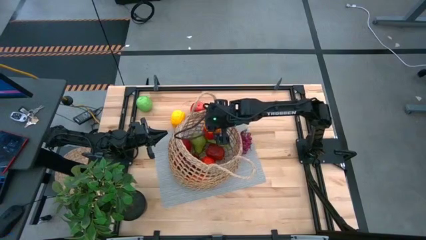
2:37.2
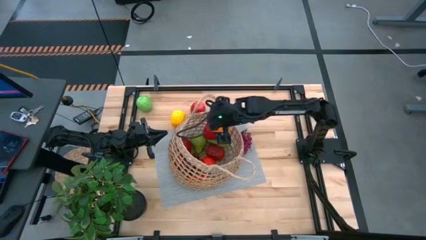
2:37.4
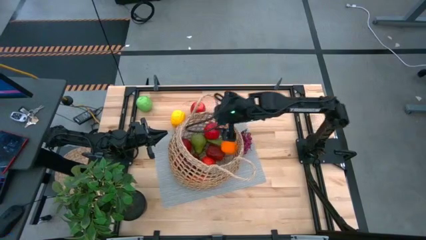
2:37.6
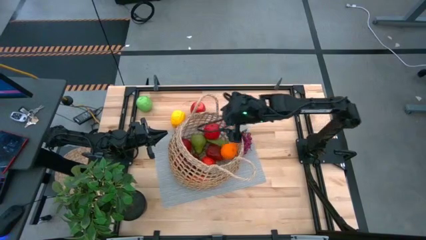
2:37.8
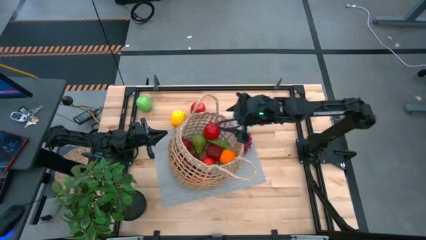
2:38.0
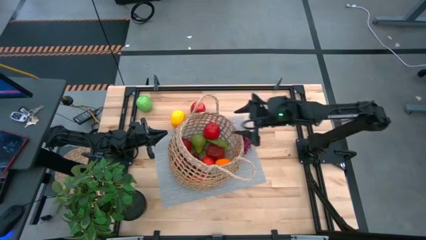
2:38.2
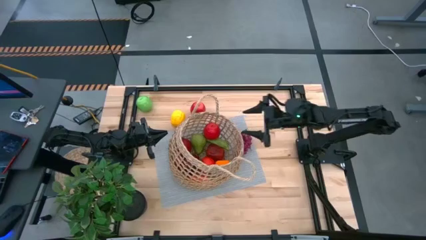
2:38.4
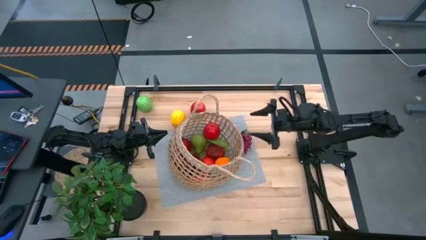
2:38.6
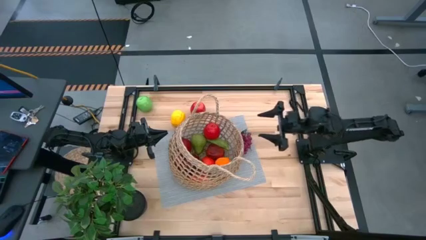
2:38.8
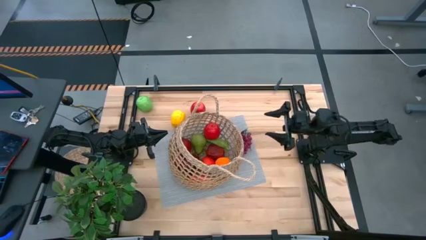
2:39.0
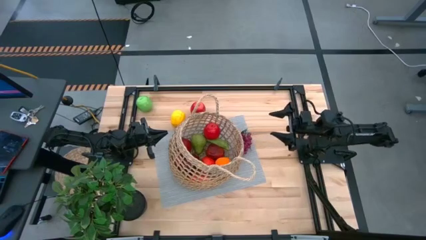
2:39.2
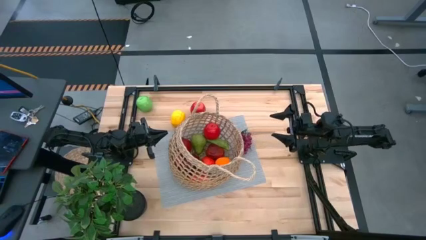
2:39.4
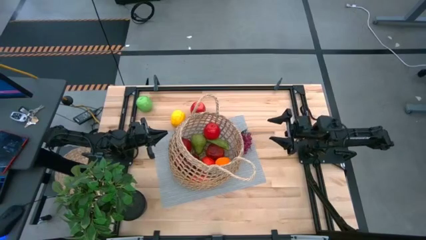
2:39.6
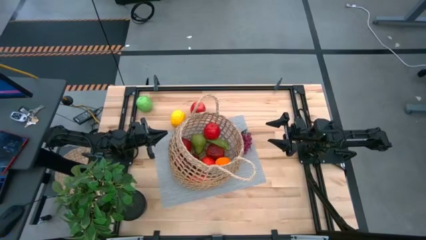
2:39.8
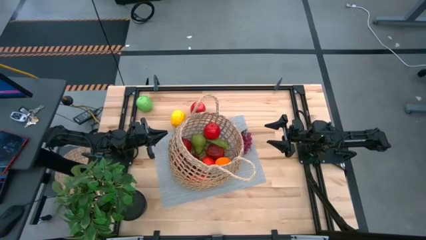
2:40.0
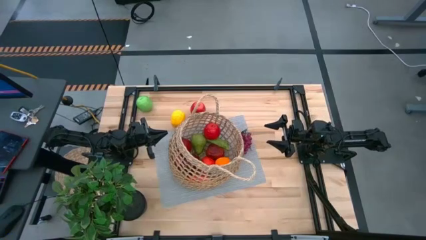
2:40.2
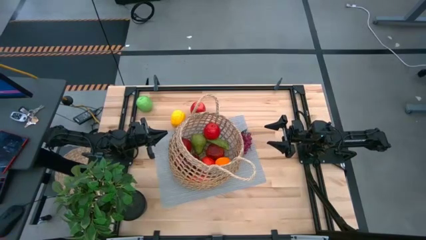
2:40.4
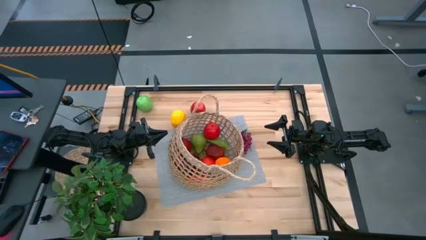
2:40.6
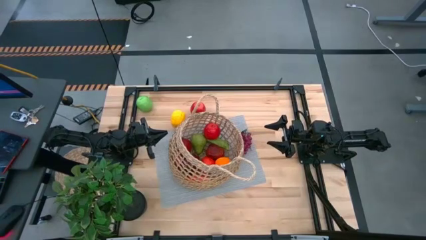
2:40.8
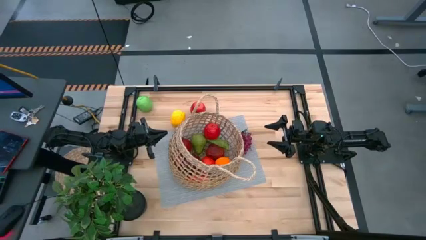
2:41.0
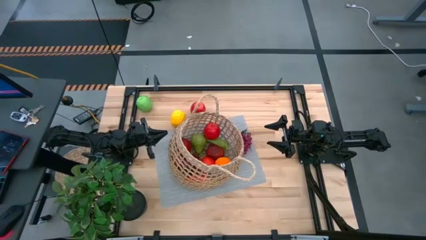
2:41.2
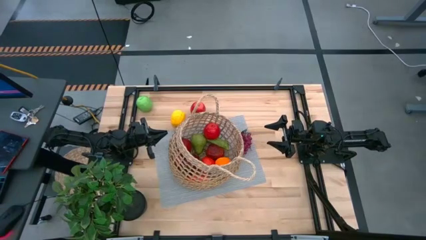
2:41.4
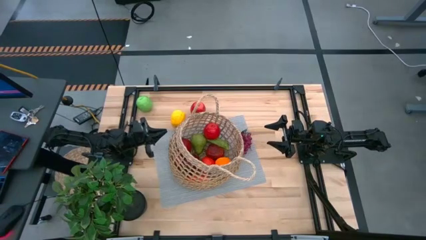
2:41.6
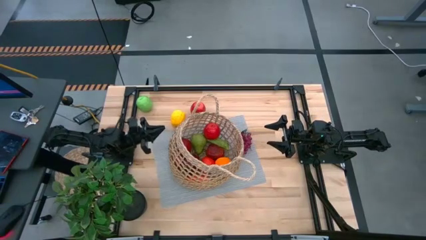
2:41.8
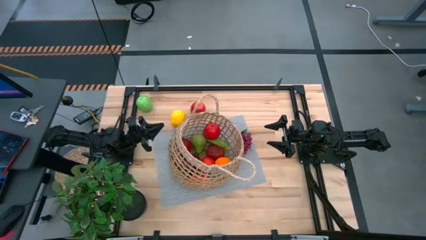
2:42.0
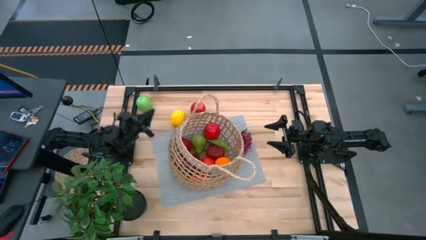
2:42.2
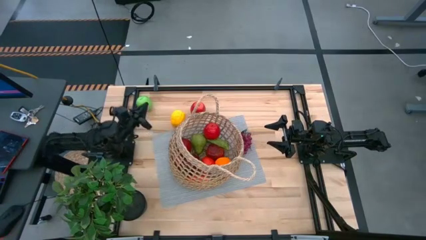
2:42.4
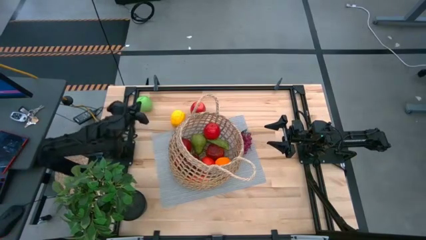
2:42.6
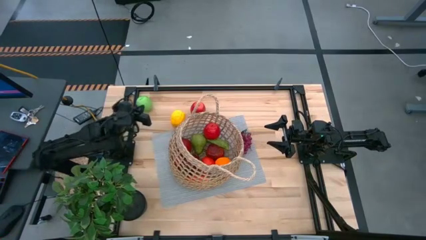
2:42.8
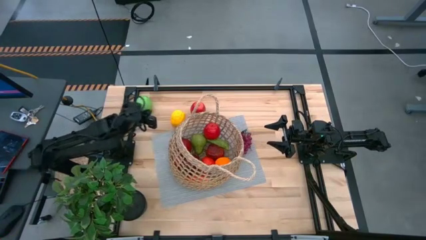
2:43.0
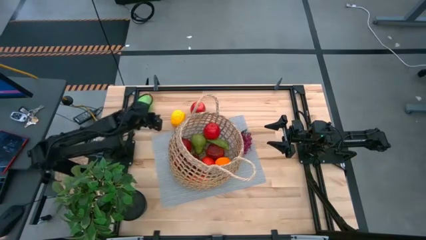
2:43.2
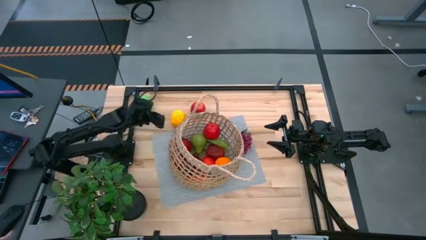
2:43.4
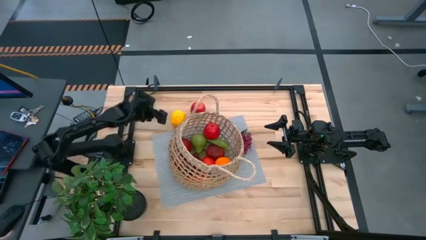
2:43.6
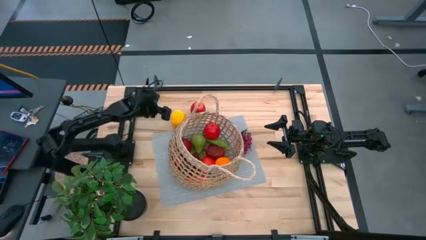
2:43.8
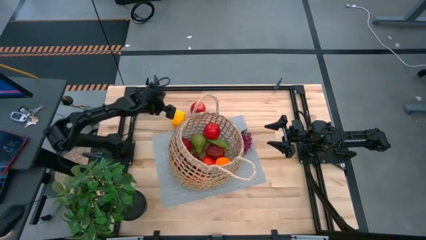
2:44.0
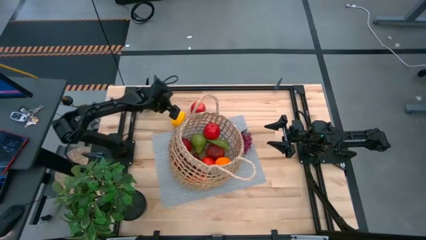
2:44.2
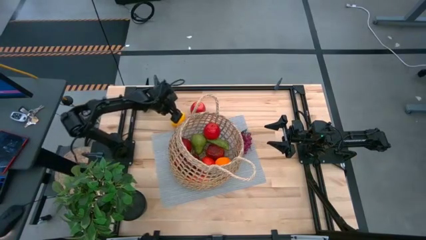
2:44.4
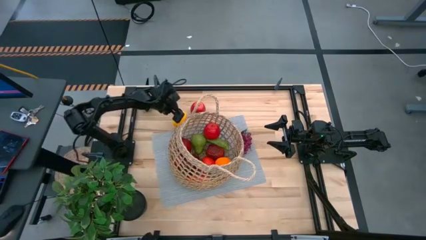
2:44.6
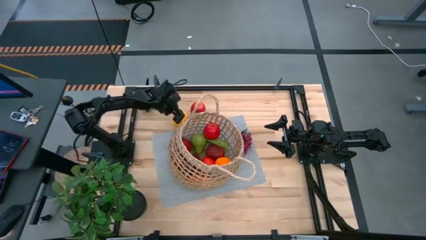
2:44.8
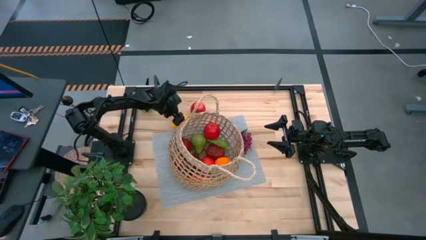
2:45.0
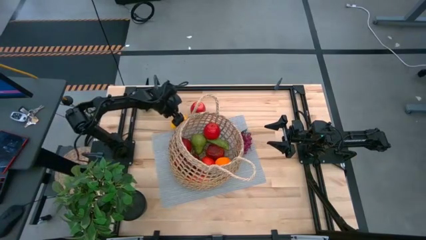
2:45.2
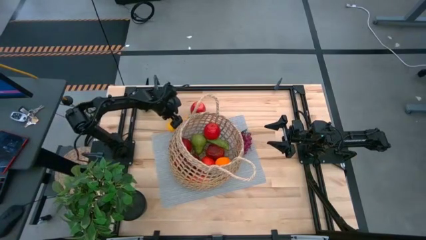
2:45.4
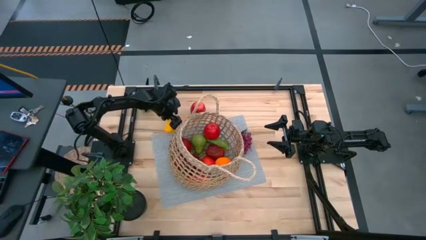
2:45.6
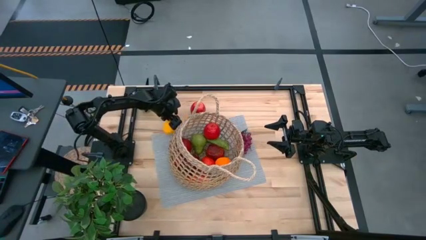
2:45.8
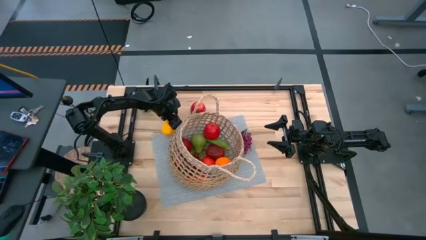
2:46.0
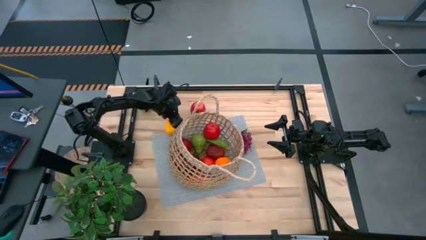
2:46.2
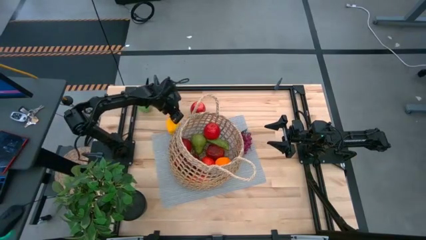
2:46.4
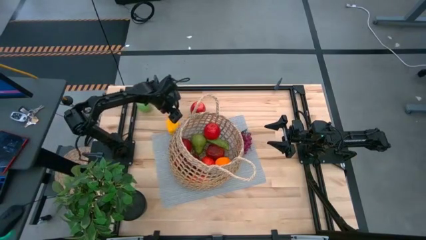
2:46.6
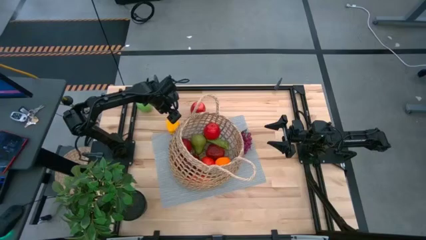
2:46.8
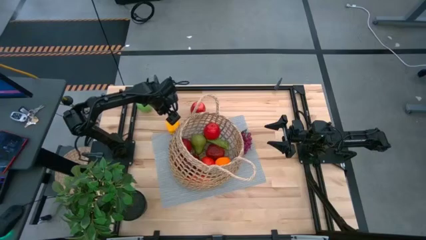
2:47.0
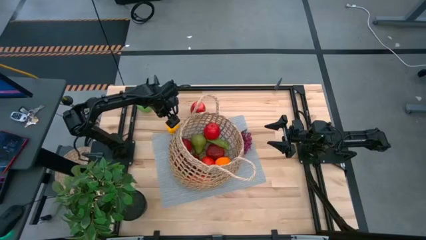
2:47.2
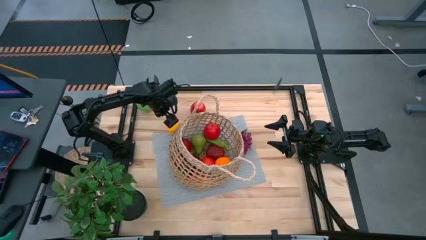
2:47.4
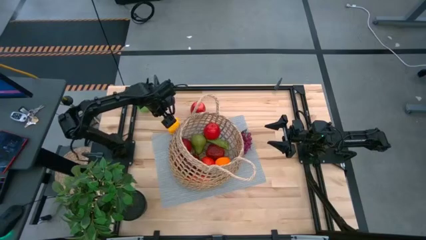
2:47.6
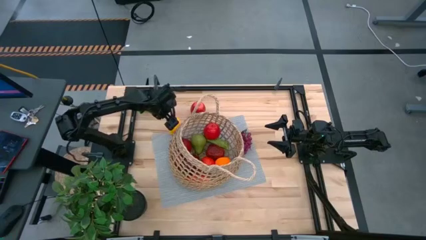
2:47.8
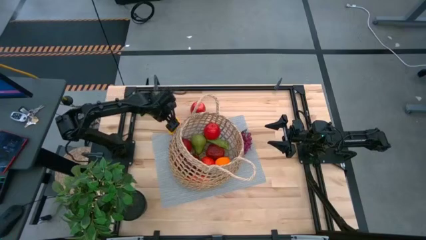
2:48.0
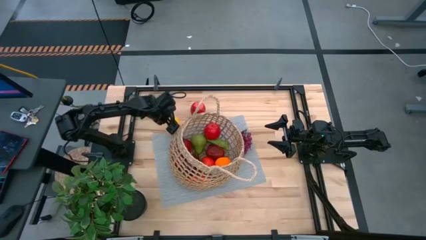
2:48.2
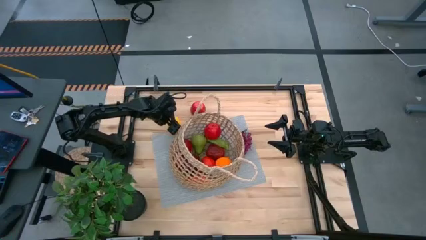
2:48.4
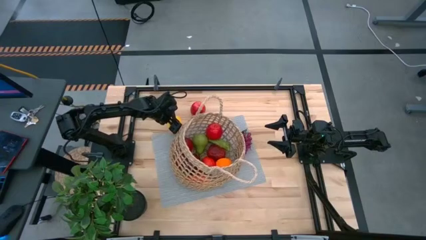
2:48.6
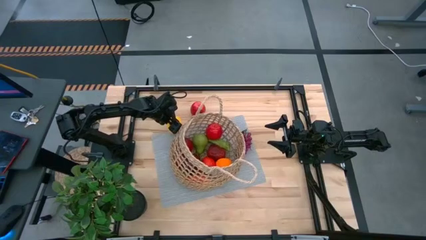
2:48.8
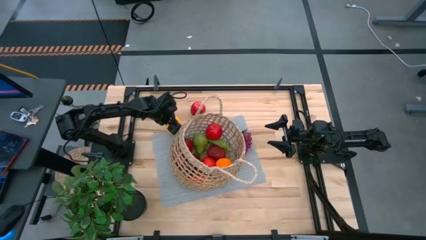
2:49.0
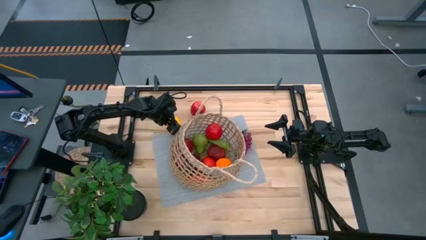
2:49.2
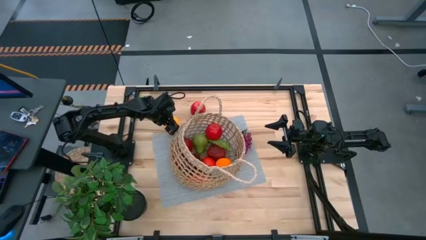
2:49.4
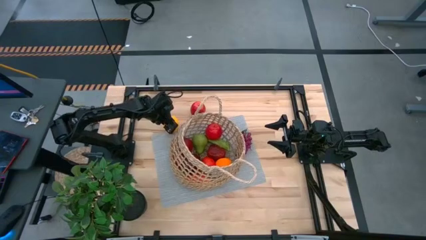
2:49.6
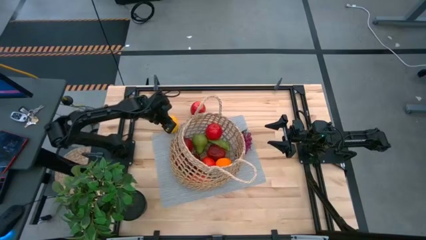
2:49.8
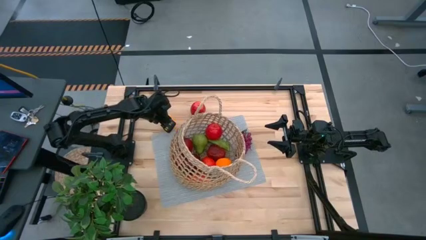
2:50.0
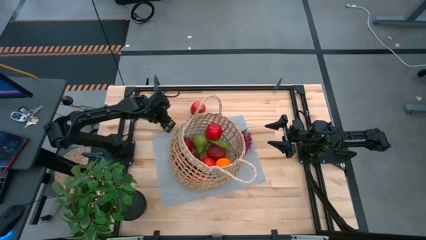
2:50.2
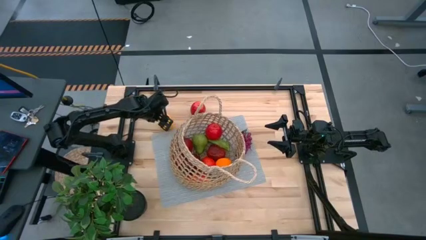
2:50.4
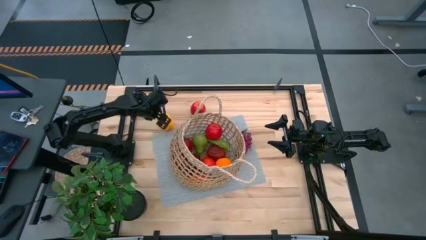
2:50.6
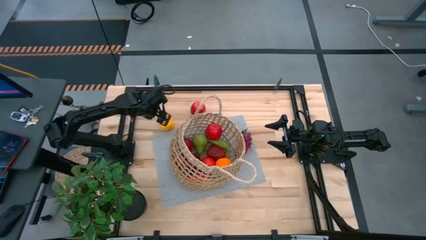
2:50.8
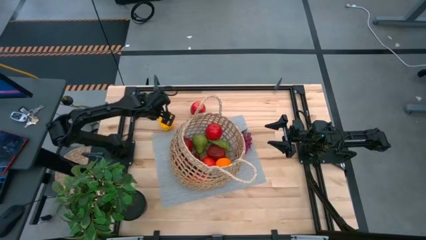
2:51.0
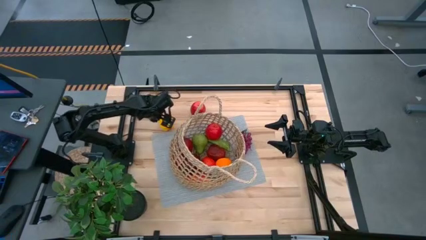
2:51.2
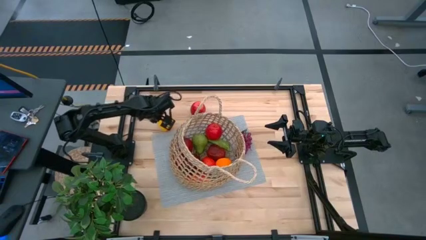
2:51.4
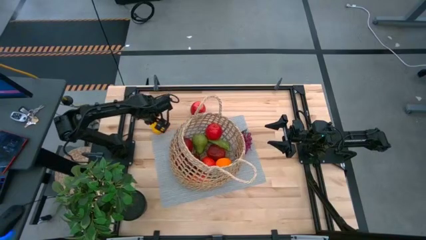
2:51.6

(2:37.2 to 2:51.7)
Task: Build produce basket
Put the yellow bell pepper into the basket

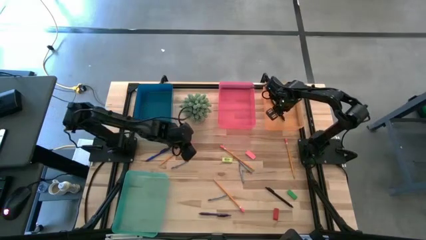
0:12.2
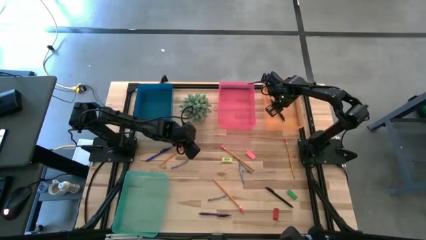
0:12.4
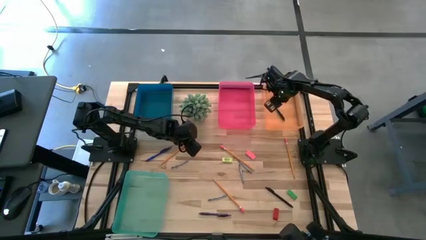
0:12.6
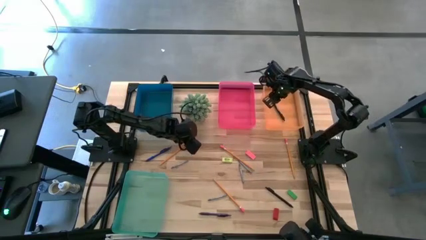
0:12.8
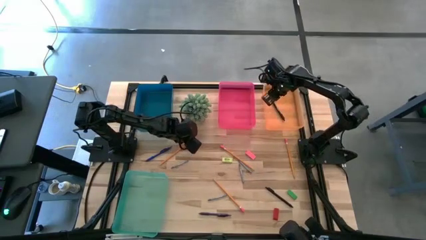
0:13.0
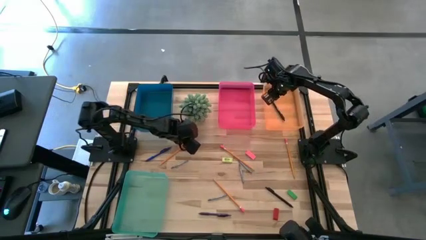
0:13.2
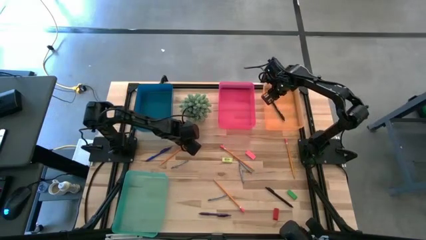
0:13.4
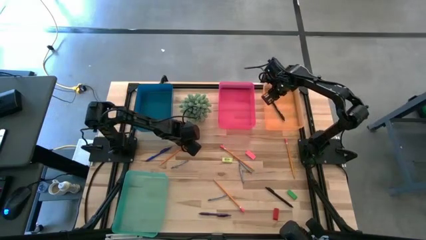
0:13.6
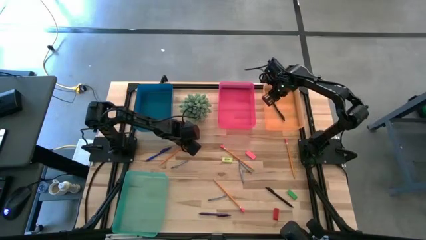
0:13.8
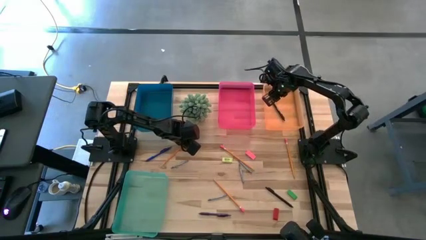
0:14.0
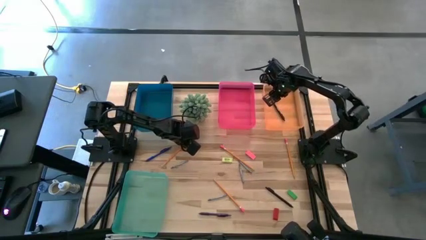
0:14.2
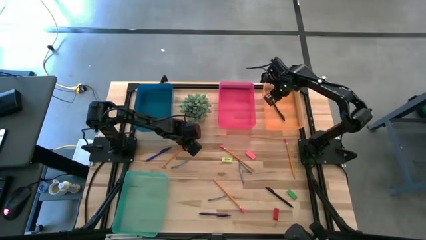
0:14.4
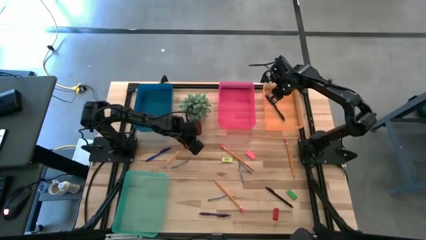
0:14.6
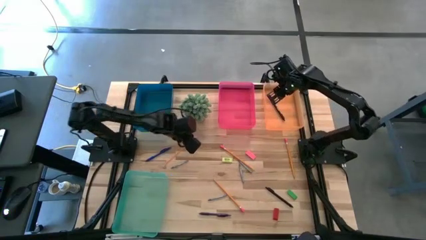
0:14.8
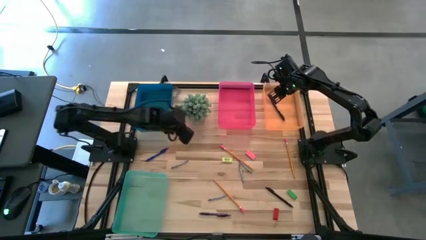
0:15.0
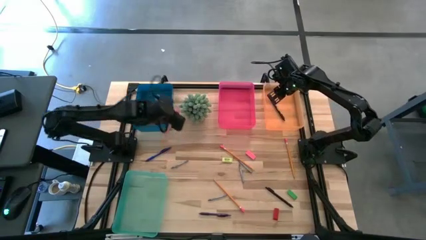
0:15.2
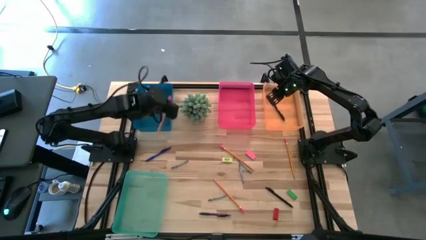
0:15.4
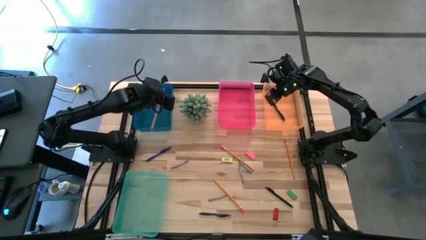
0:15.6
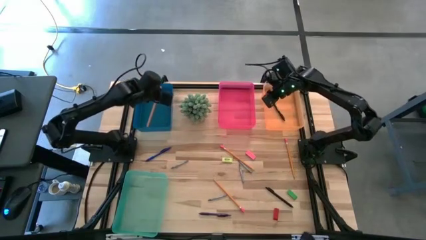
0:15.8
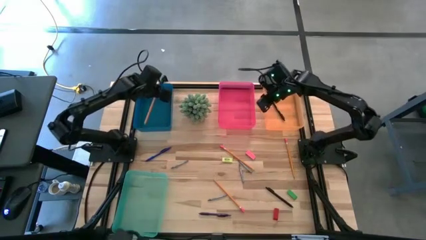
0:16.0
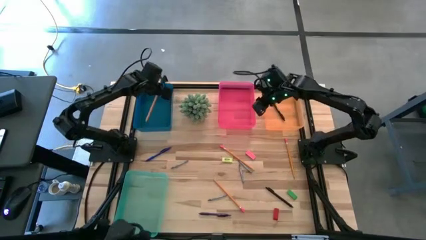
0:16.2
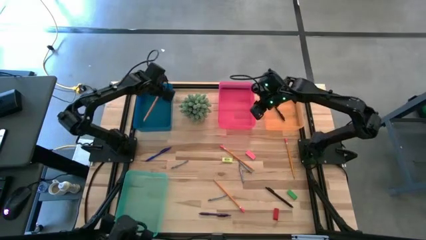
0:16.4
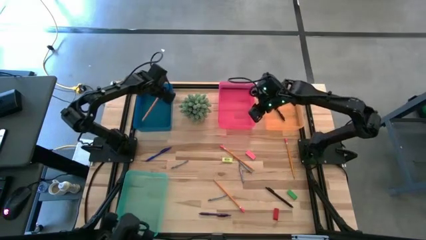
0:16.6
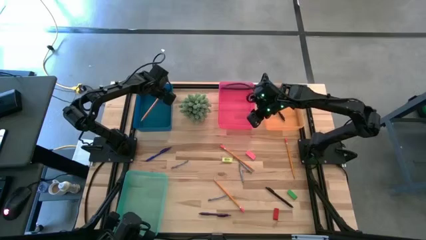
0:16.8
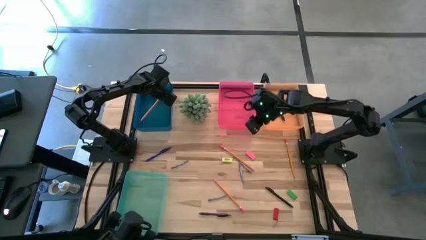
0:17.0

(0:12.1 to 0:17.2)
Task: Sort crayons/erasers/pens/pencils in bins
Put the orange pencil into the blue bin
